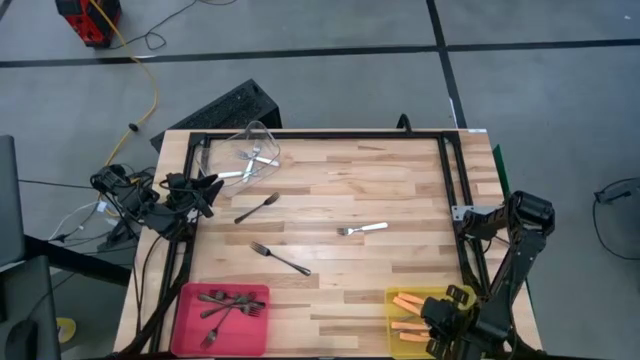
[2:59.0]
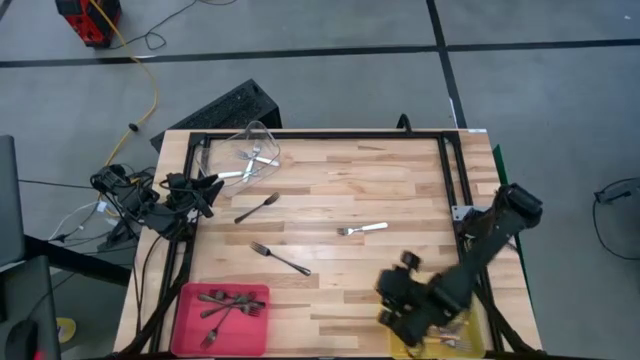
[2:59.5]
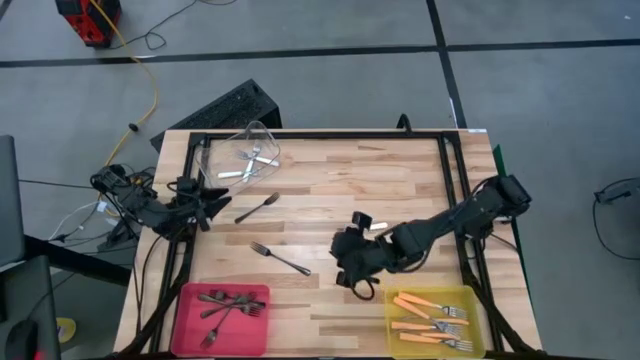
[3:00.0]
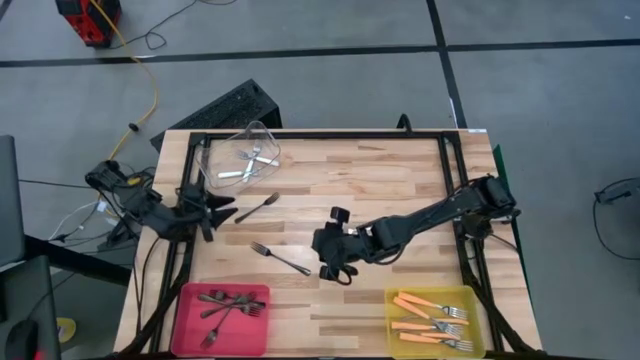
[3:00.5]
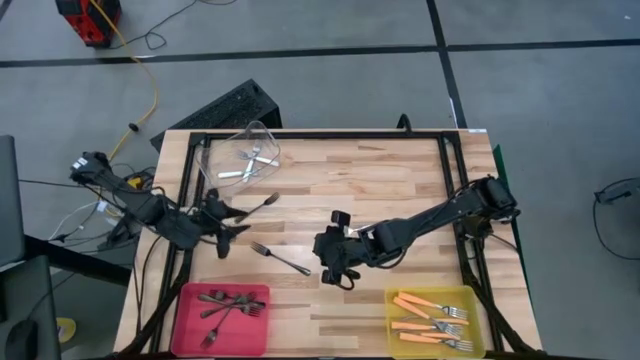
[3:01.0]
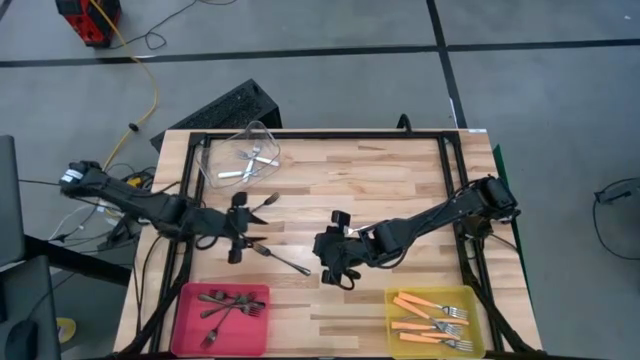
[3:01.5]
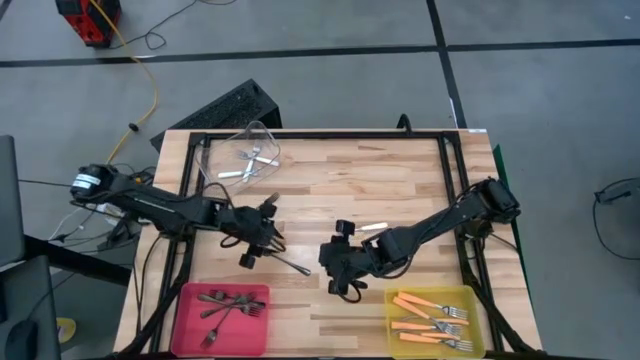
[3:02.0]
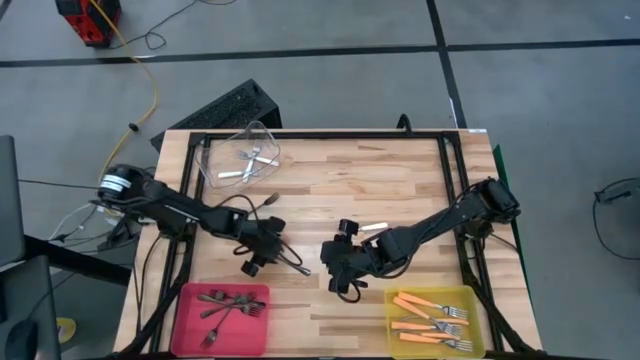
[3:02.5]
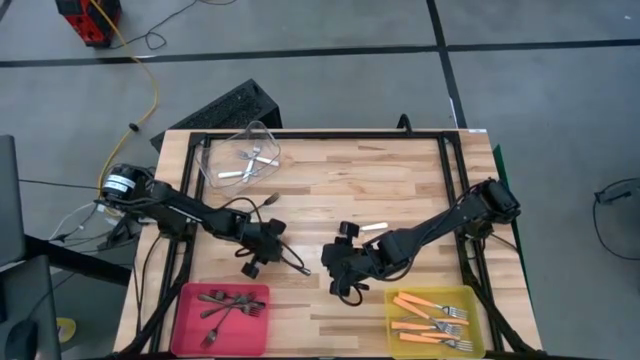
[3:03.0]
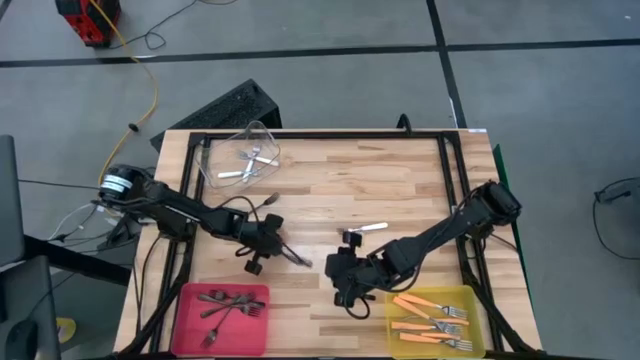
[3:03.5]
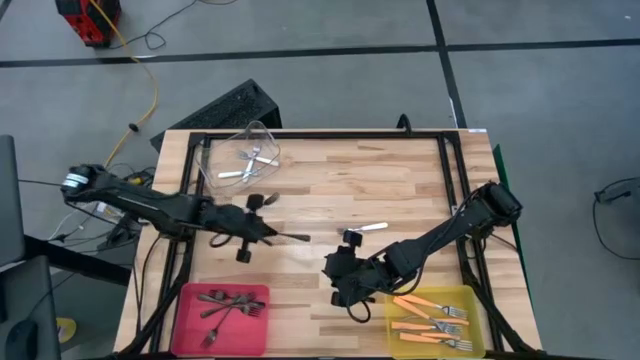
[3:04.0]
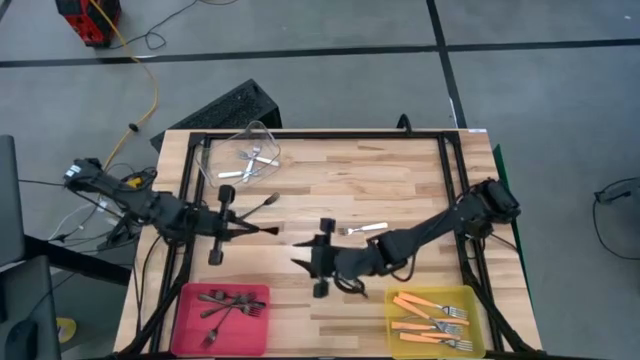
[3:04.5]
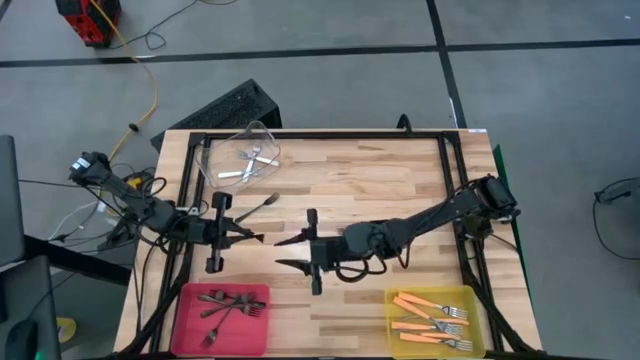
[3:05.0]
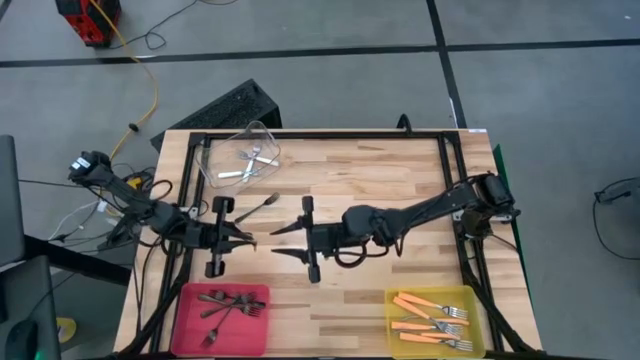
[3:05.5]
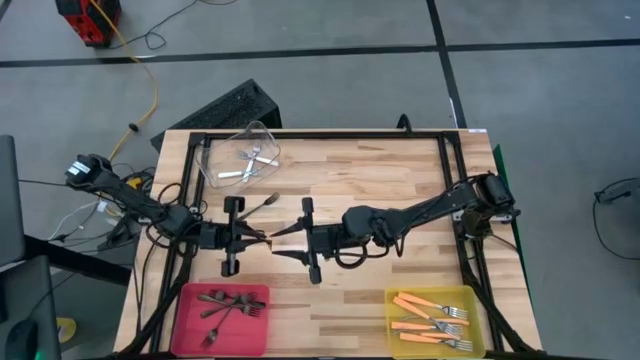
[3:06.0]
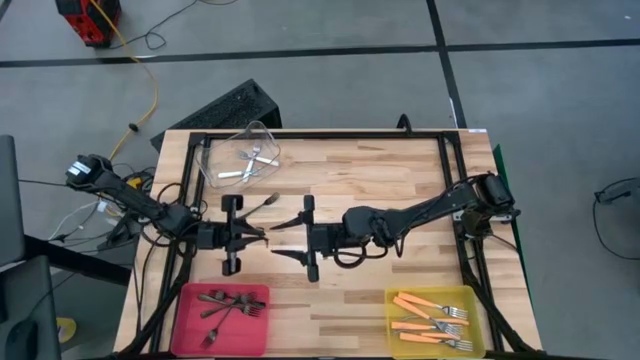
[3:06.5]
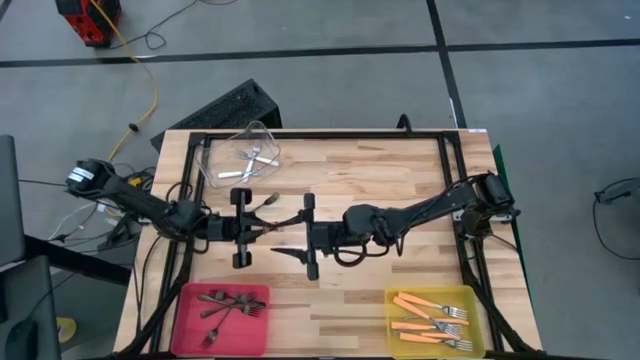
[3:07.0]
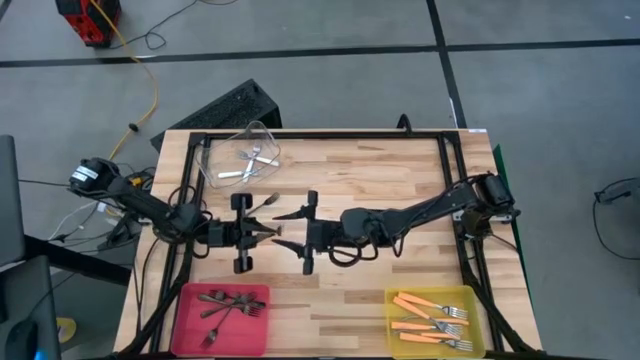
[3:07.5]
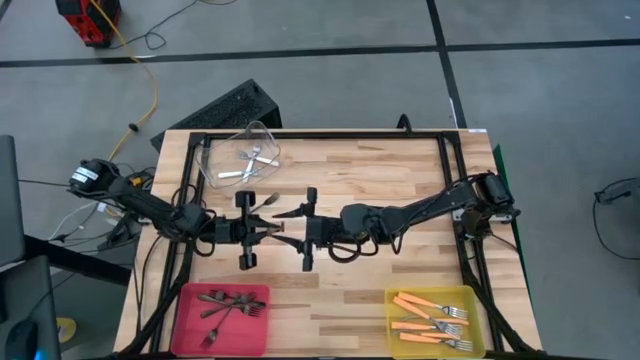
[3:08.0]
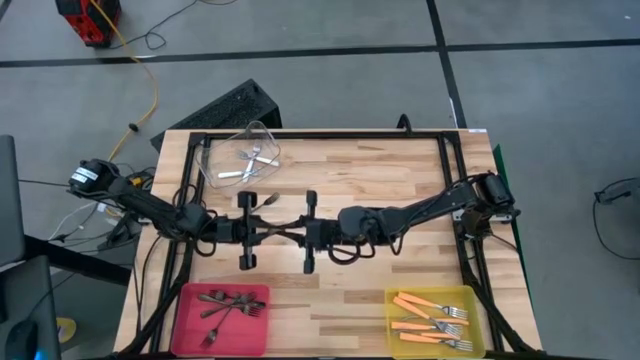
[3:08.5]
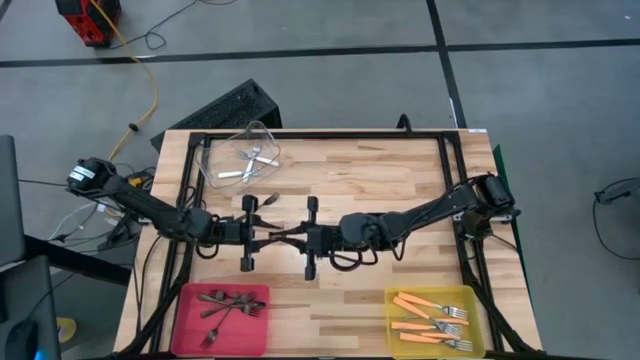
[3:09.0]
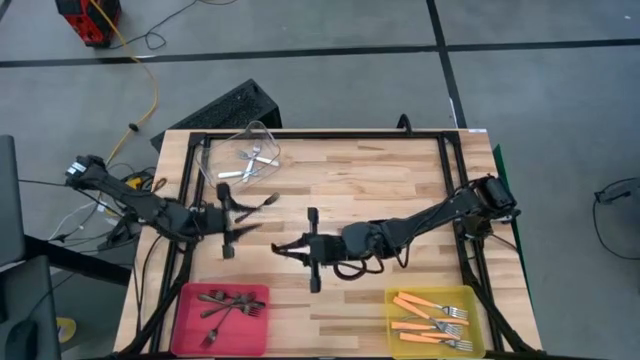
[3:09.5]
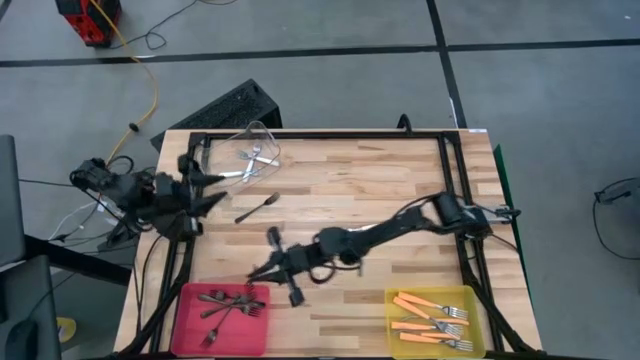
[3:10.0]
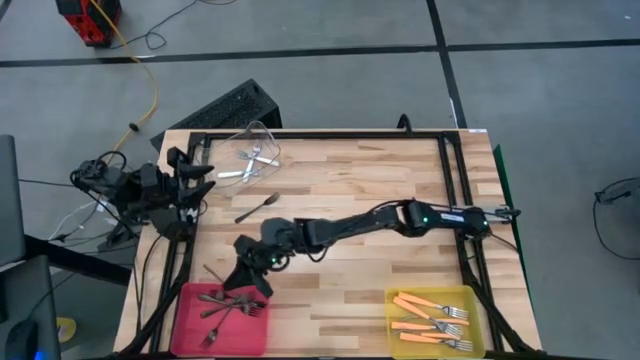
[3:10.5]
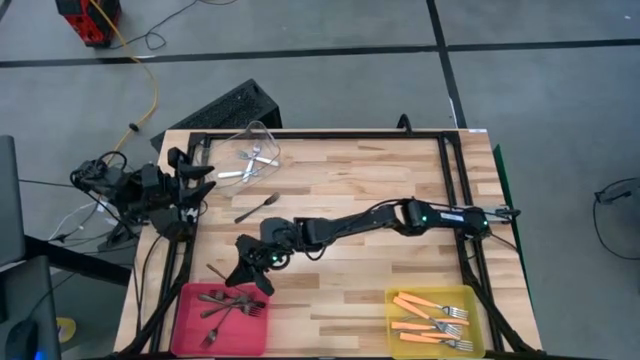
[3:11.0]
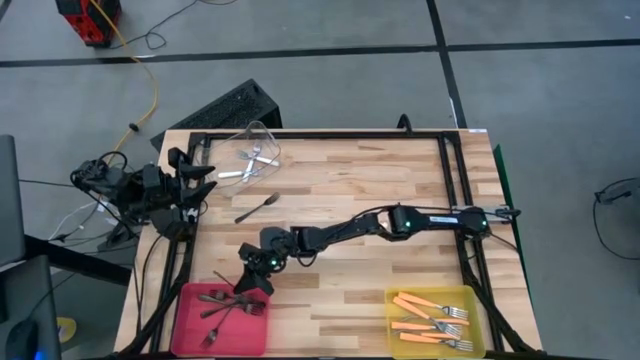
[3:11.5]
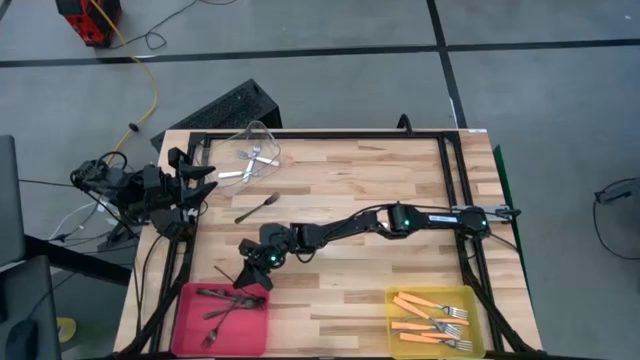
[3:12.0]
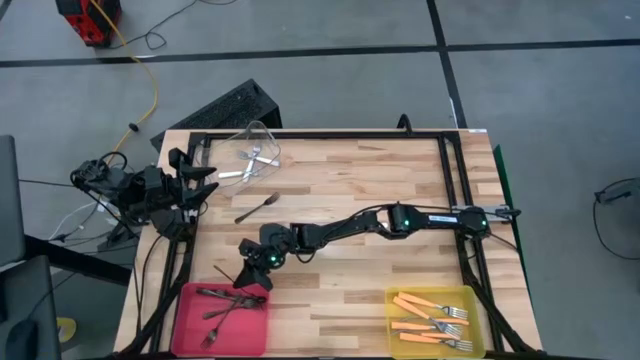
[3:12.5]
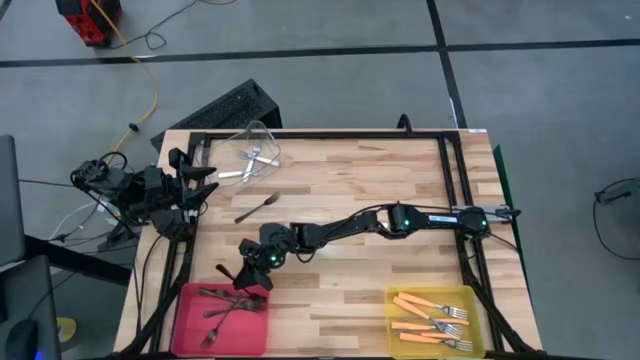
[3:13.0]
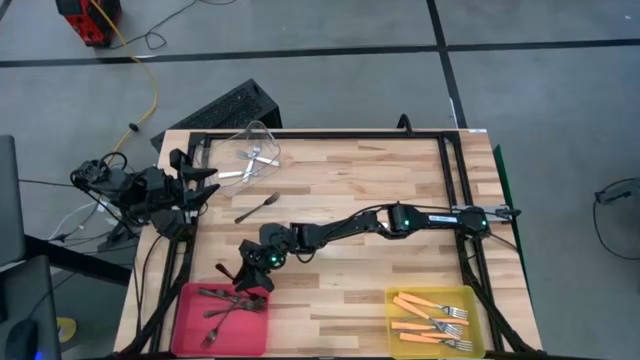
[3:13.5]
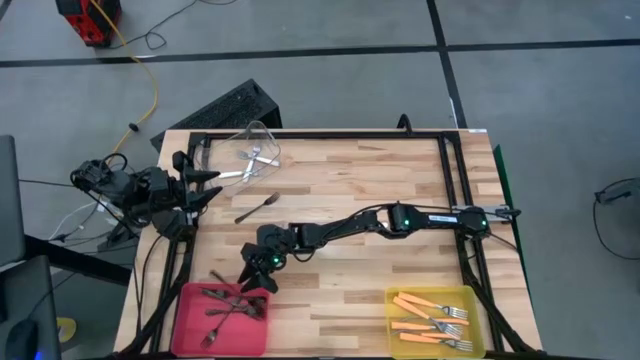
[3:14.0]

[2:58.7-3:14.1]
Task: Sort silverware by color (type)
Put the black fork into the red bin

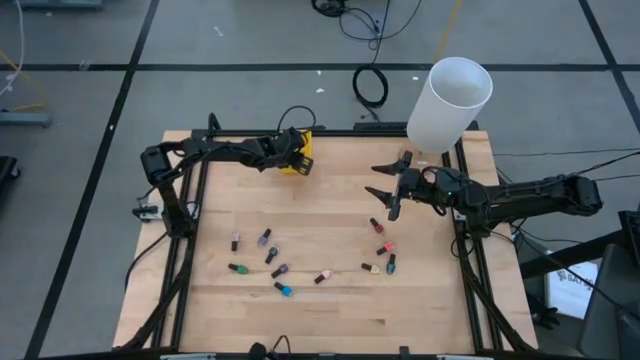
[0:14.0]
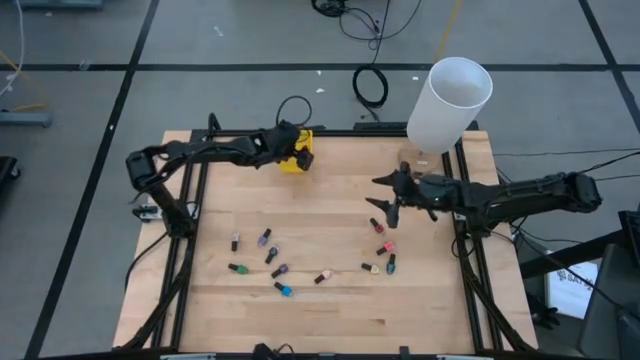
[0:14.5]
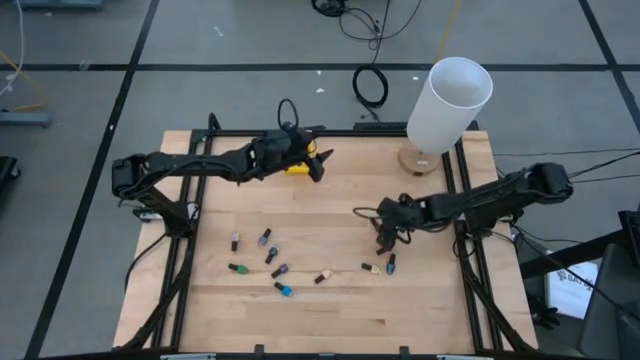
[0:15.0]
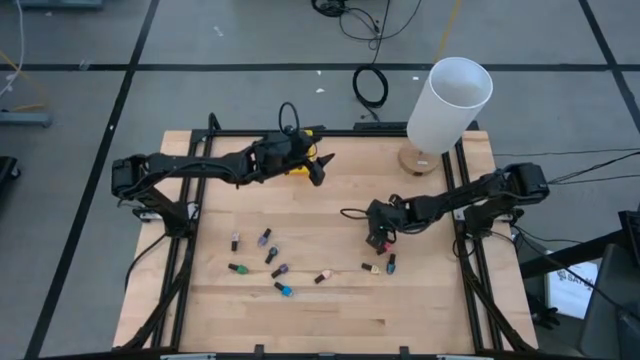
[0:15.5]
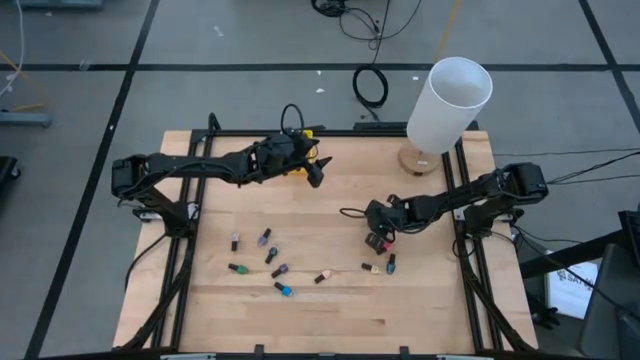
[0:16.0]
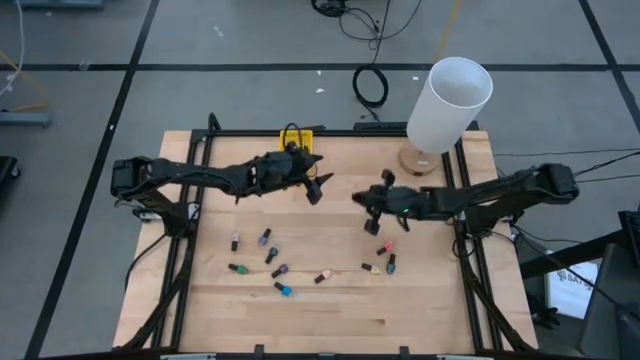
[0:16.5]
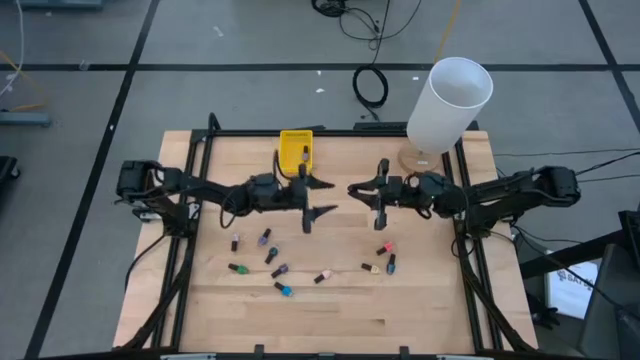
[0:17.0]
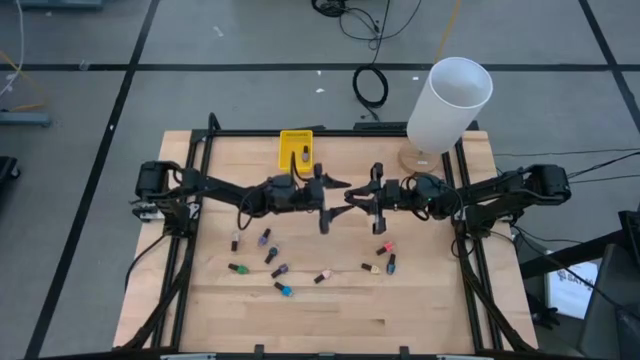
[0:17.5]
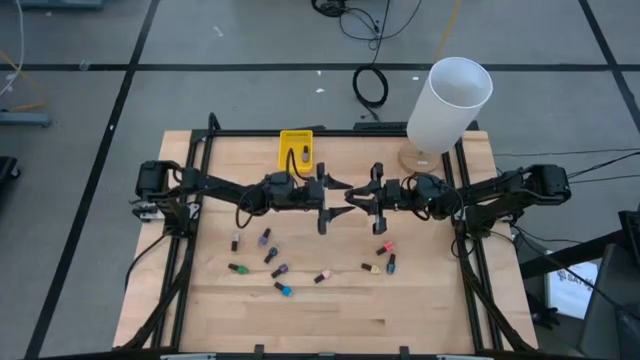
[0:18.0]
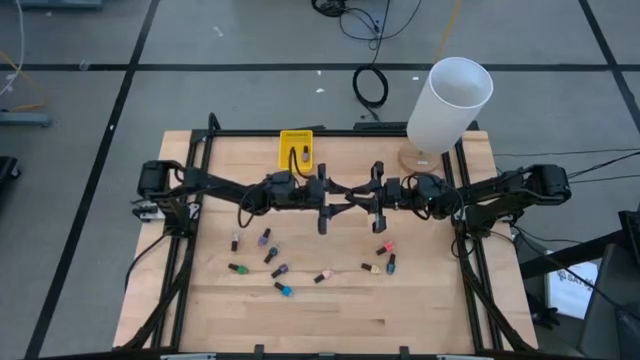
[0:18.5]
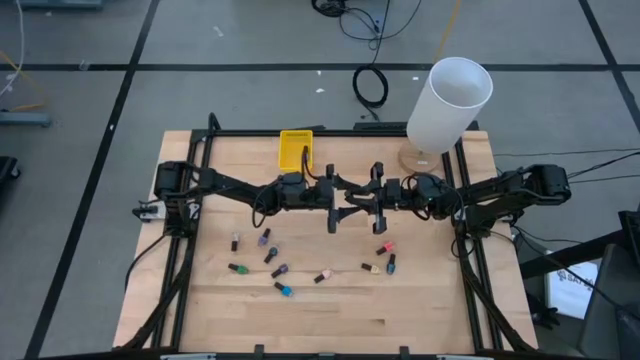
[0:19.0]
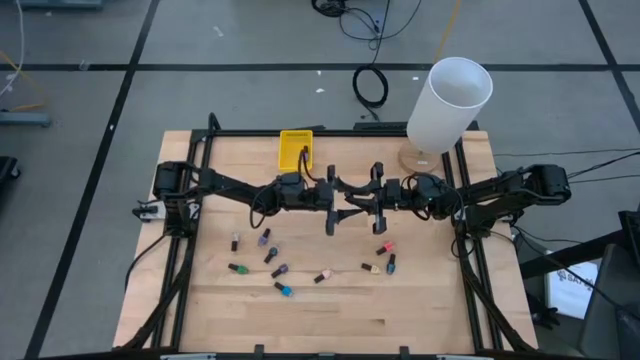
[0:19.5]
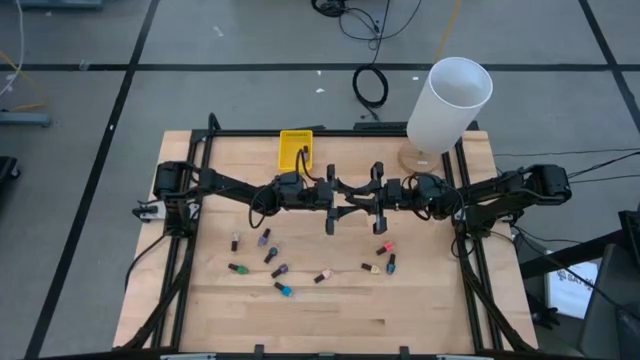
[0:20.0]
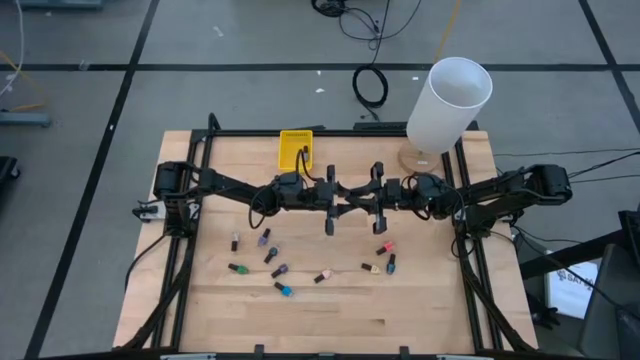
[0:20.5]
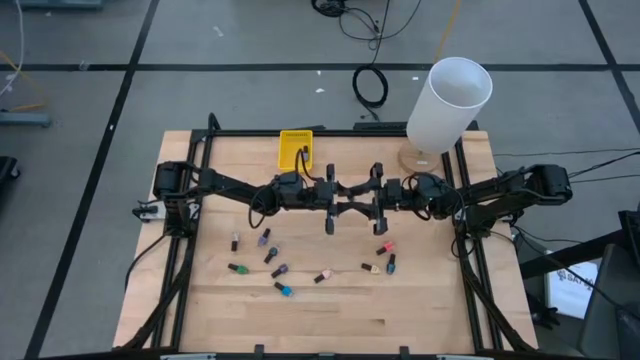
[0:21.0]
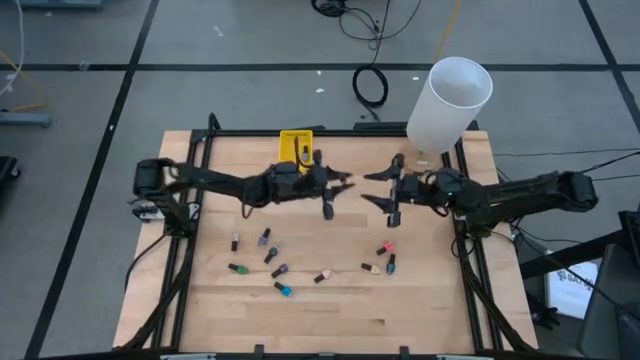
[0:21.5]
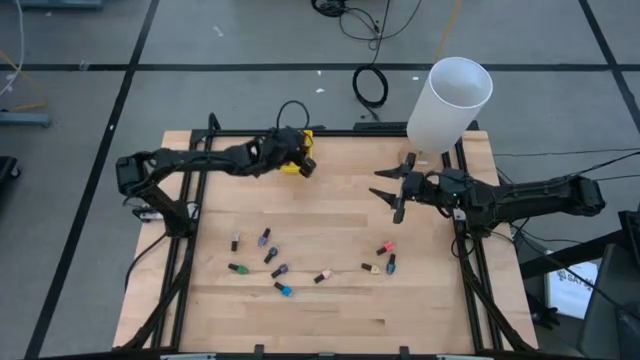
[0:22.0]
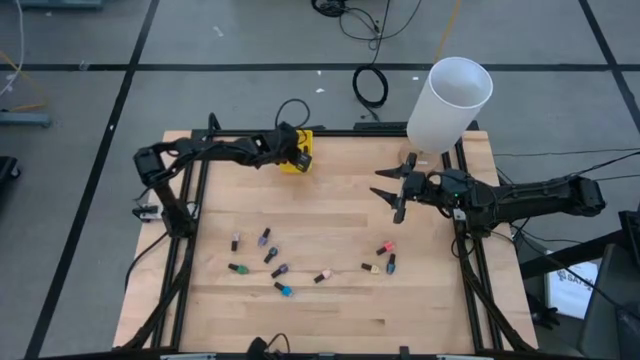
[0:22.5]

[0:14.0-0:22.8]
Task: Pick & Place Nail Polish
Put the red nail polish bottle into the yellow bin
